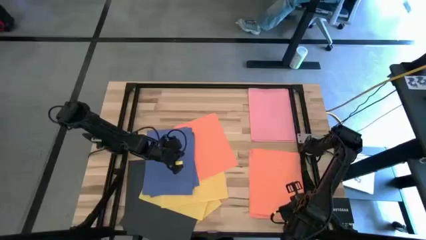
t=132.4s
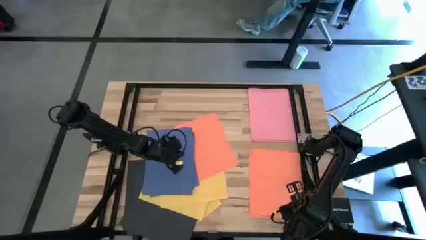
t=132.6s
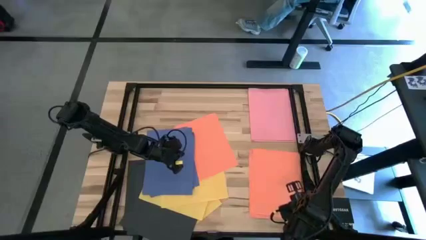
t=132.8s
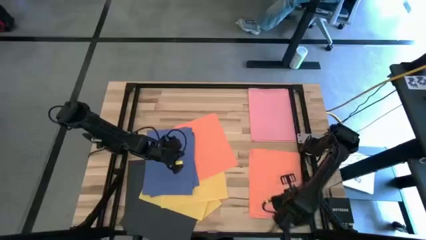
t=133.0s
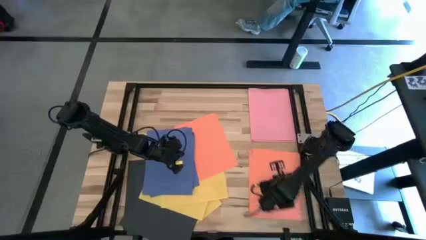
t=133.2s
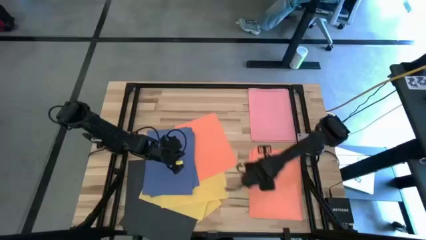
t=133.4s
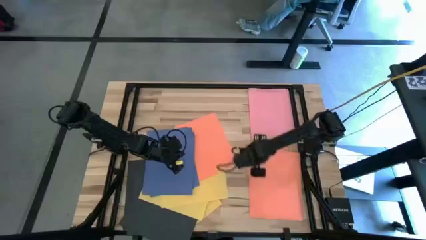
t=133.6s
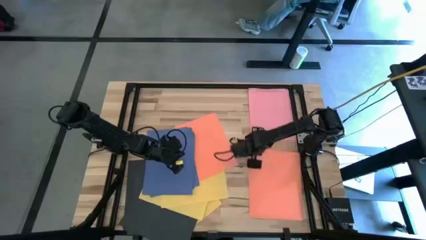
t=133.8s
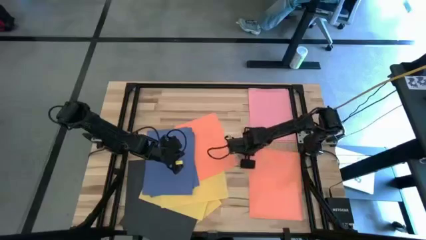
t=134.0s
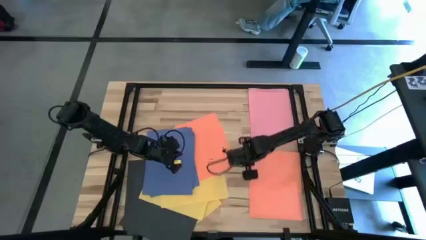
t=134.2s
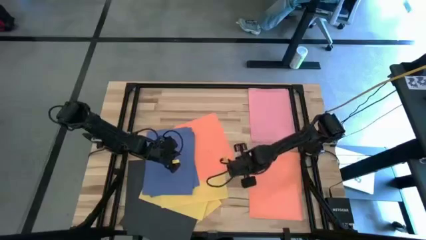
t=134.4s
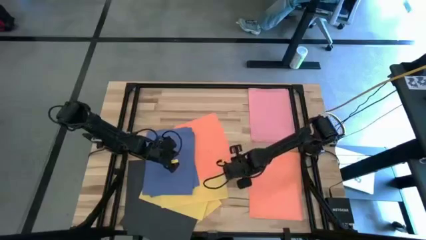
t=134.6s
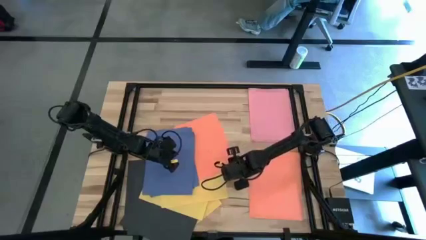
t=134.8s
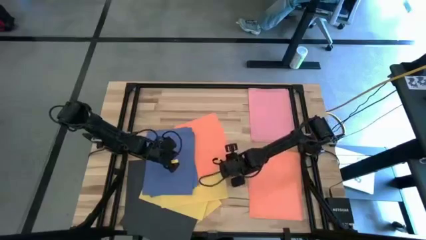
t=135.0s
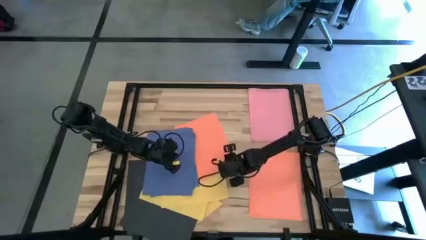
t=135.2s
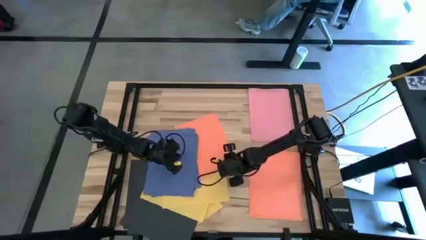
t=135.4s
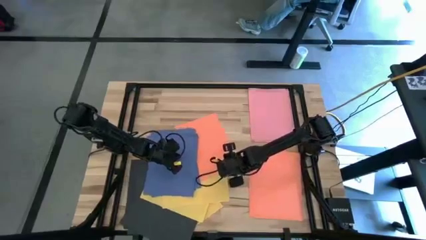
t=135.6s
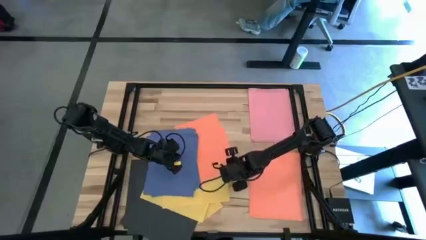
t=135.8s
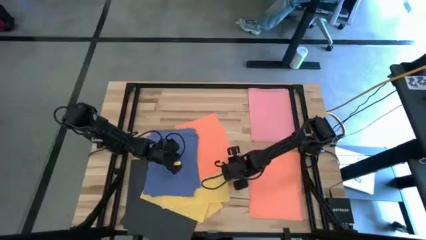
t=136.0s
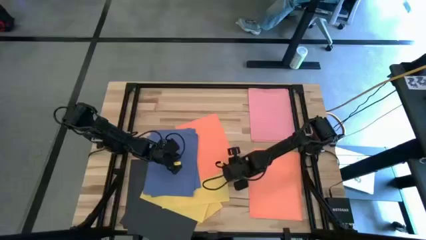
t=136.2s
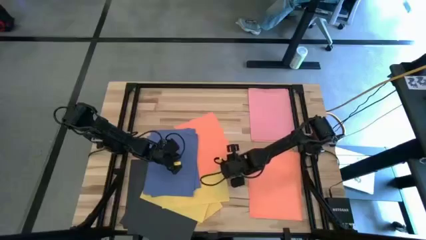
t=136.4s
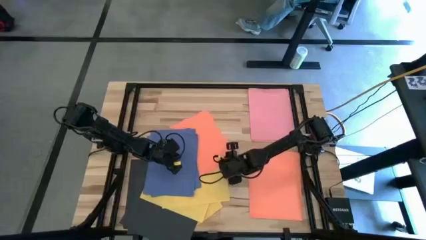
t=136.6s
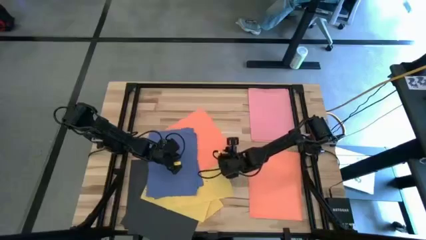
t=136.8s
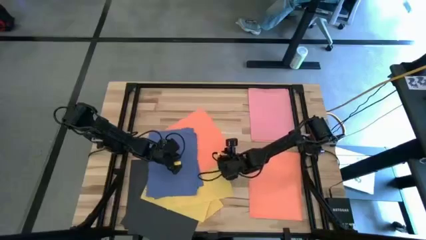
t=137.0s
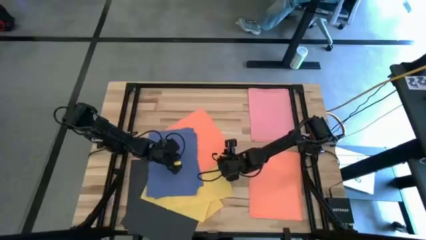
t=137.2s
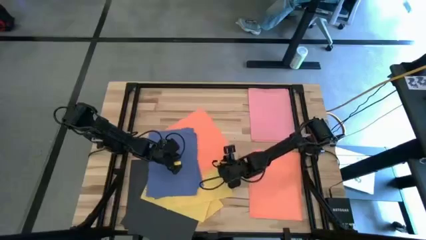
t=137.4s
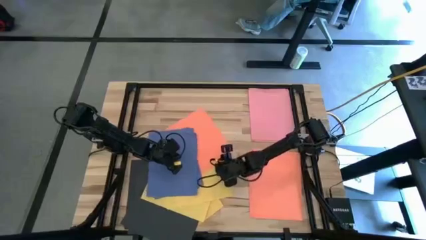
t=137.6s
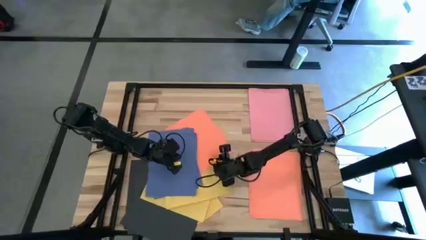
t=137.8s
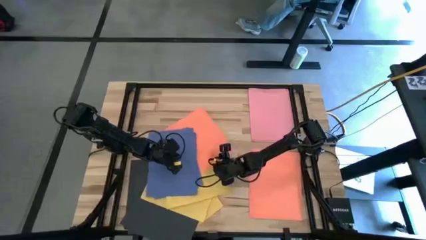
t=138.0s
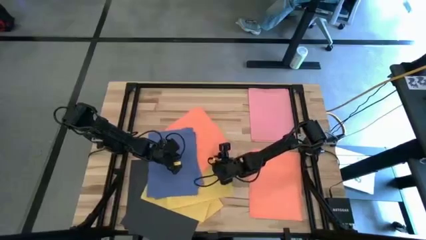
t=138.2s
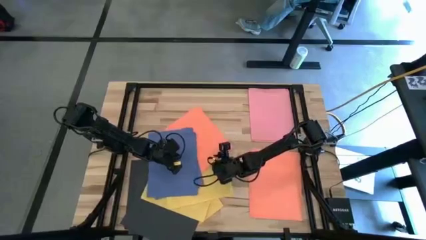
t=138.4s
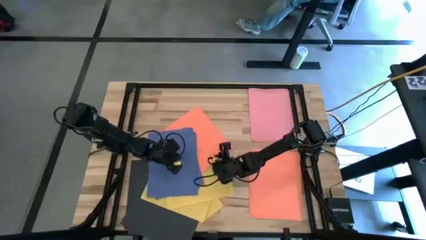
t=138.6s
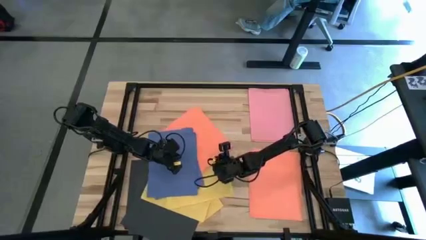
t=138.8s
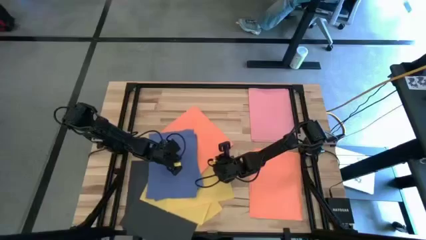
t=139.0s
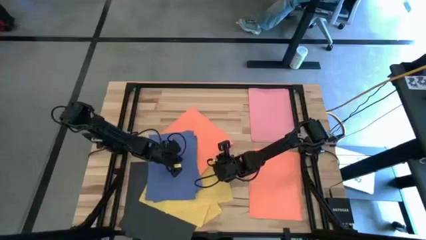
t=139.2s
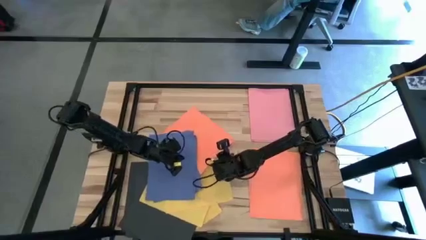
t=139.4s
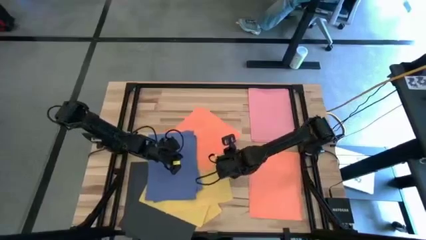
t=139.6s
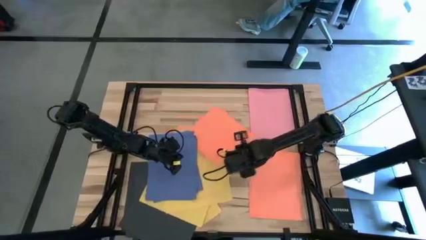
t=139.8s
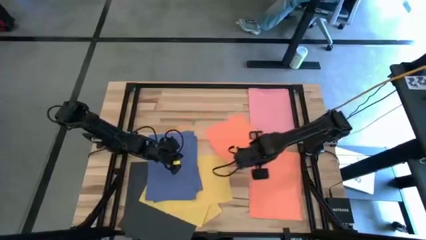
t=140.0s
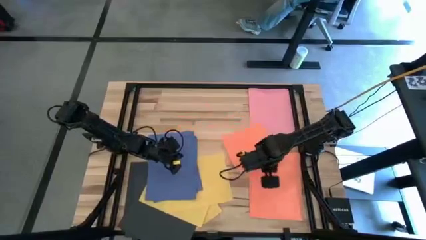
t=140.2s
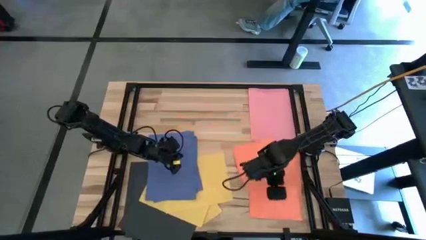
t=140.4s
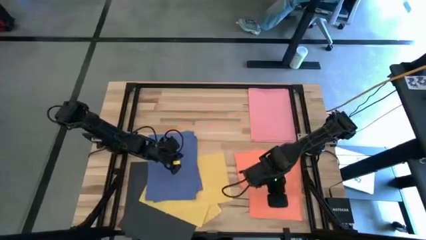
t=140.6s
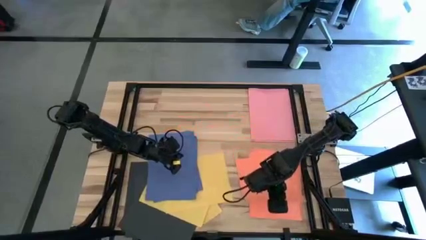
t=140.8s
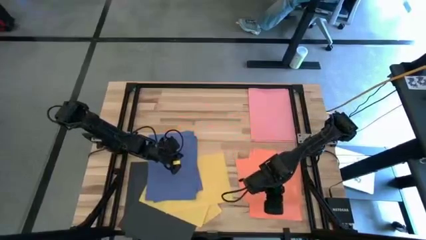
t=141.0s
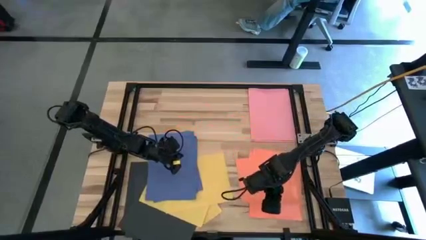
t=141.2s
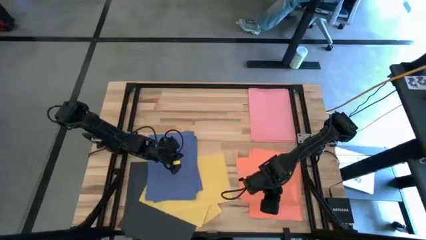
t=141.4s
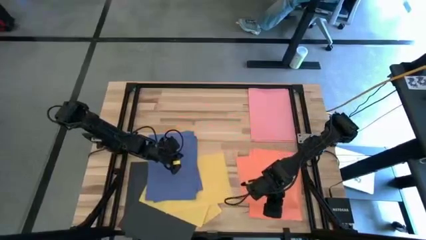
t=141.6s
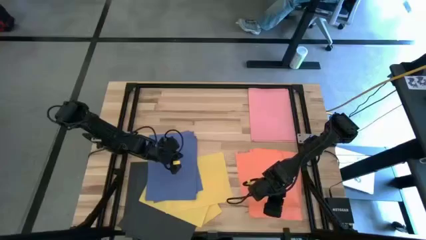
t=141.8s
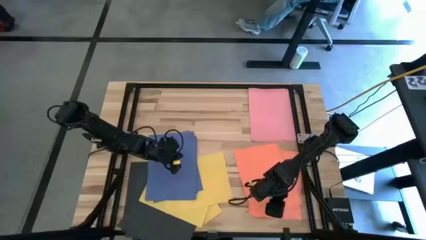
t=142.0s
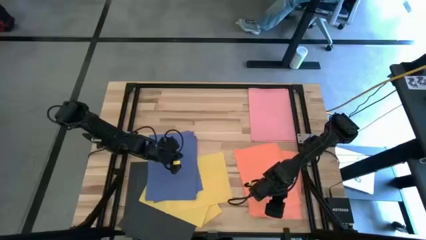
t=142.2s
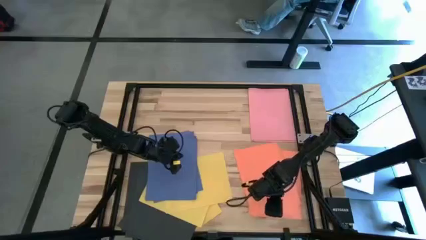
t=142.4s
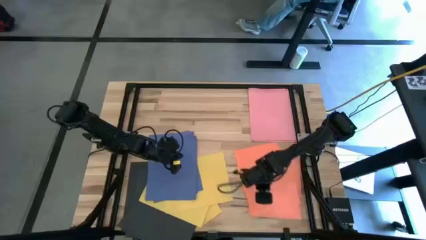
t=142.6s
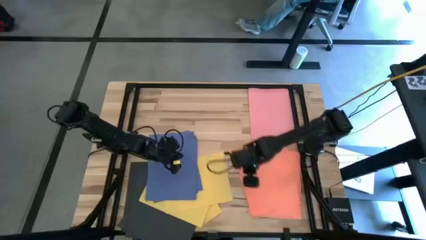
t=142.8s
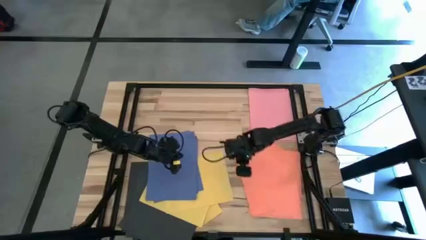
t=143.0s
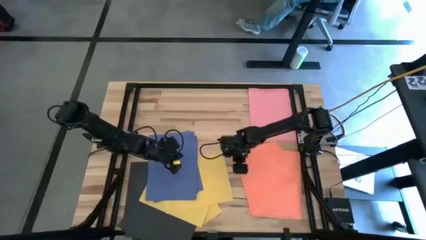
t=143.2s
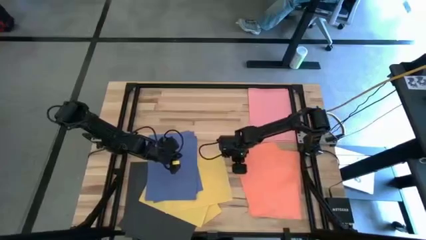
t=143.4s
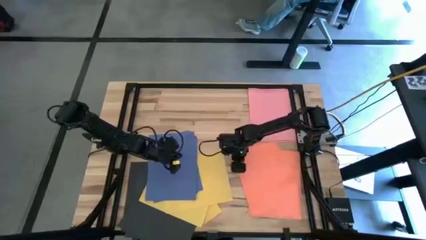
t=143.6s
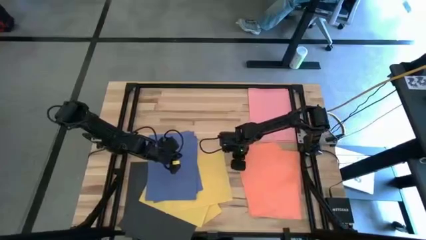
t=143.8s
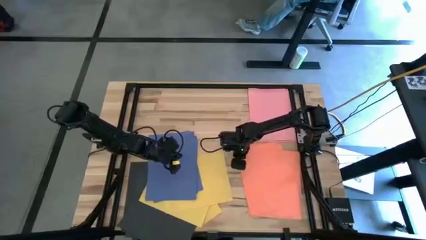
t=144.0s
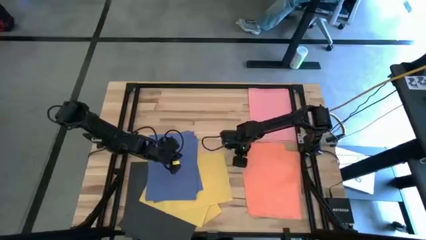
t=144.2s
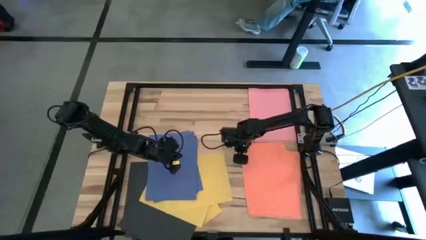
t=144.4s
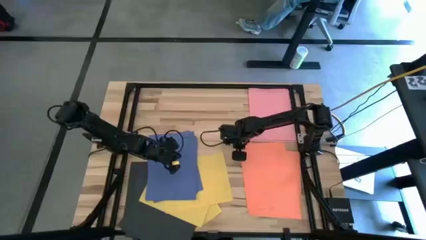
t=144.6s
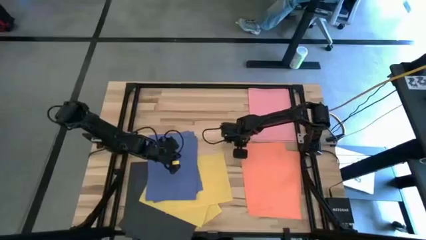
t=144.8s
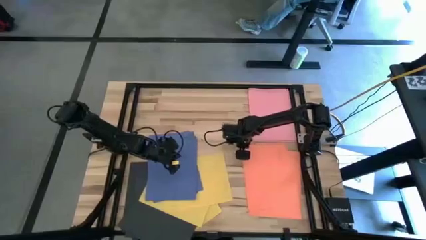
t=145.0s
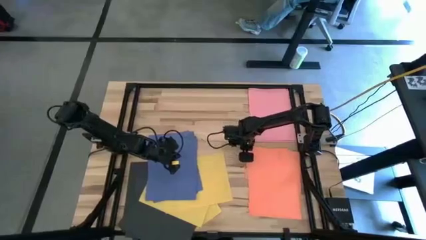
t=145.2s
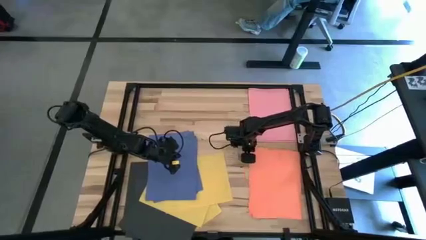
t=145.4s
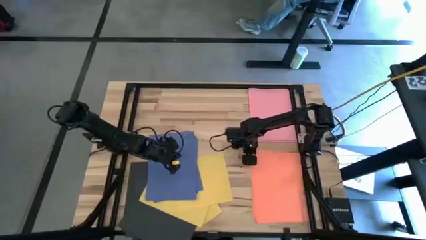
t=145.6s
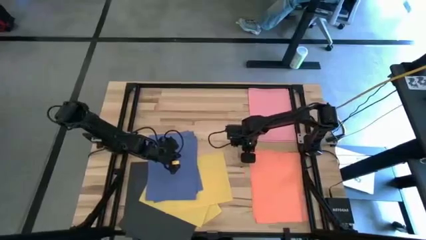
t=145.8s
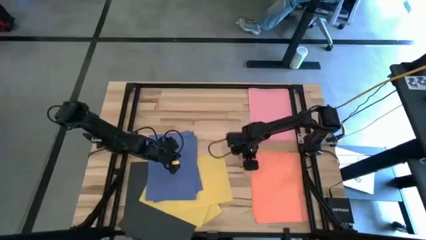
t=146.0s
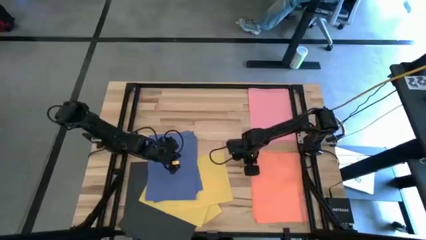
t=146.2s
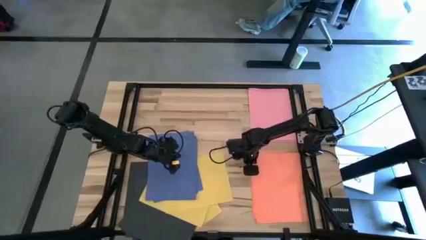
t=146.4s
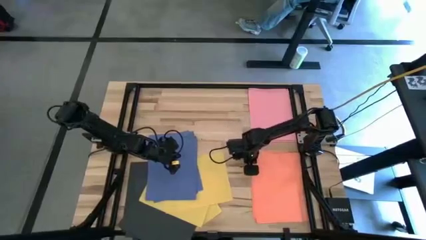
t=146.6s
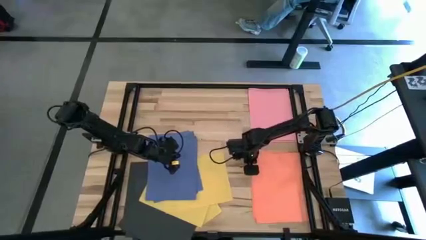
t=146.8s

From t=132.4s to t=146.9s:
Task: Organize paper
Stack the orange paper on top of the orange paper

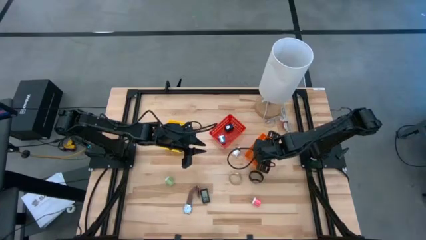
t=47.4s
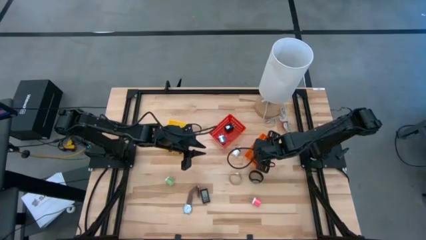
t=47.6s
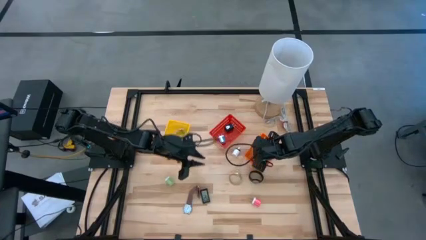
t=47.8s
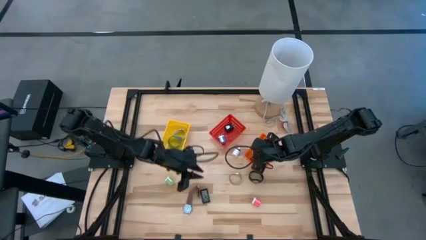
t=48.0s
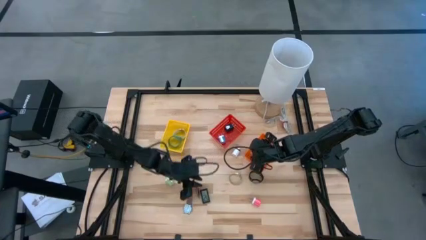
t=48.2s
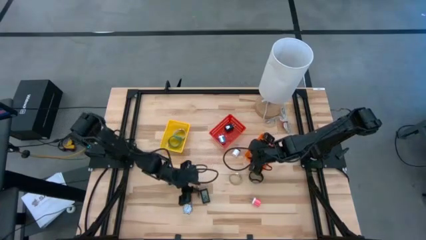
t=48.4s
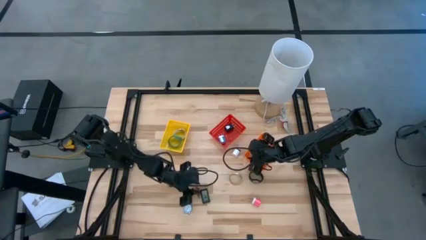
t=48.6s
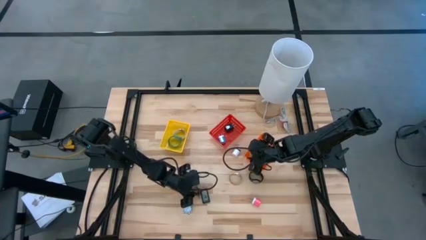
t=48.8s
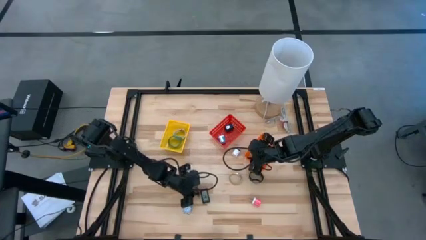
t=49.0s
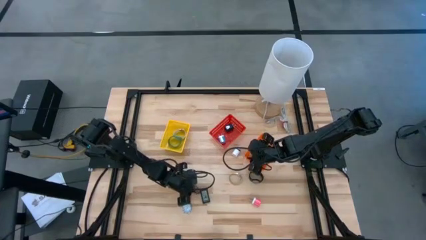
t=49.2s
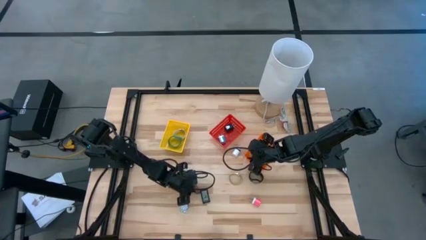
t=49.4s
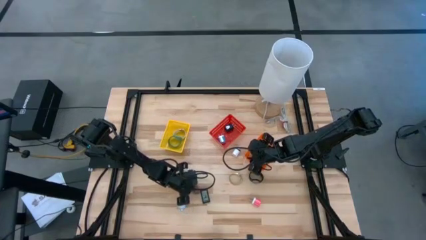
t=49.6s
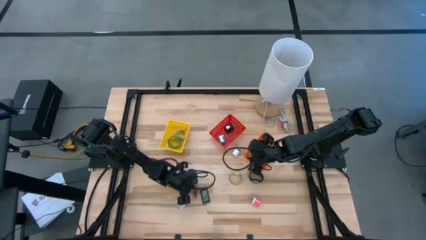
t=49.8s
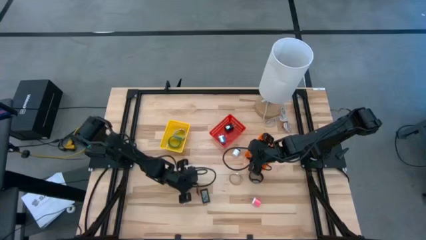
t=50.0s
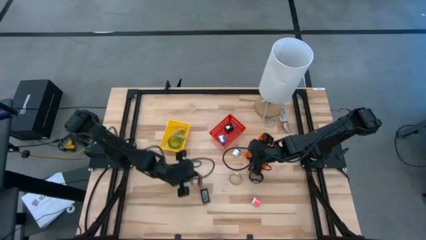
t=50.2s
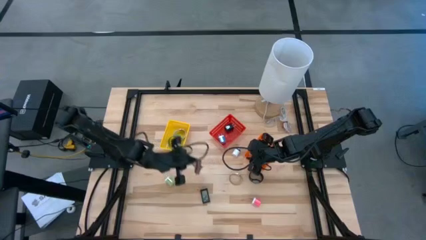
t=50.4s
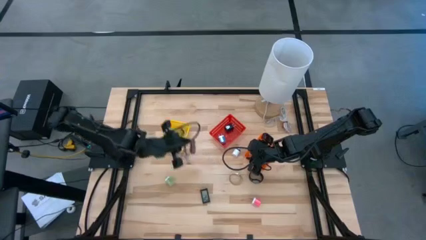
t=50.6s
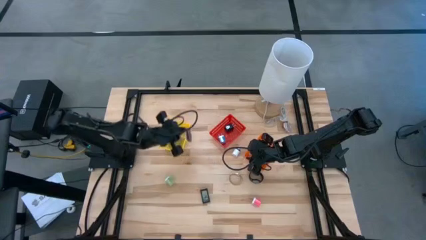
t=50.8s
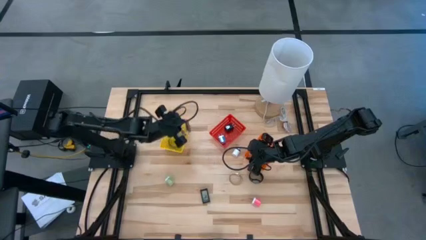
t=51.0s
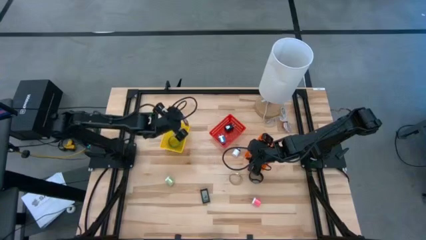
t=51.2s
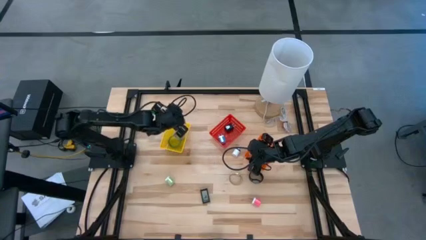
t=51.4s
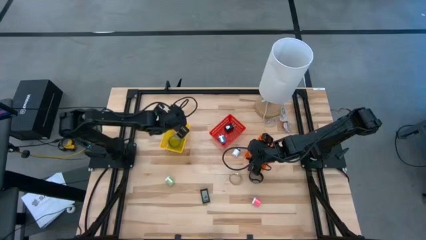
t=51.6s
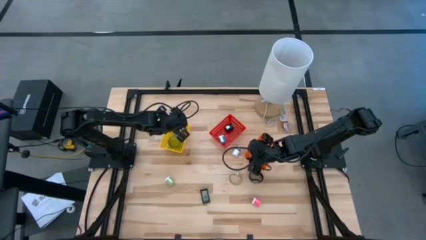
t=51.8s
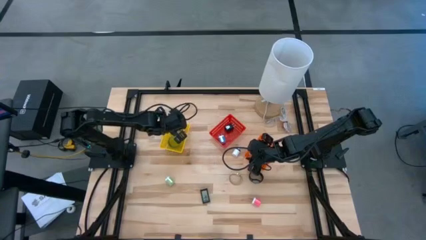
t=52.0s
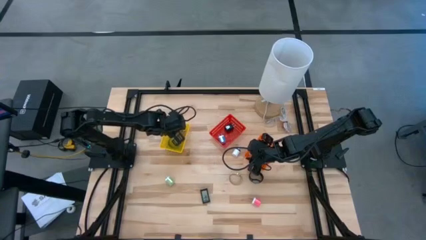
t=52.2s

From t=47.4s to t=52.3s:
Task: Pick & Place Office items
Put the brown watch into the yellow bin
